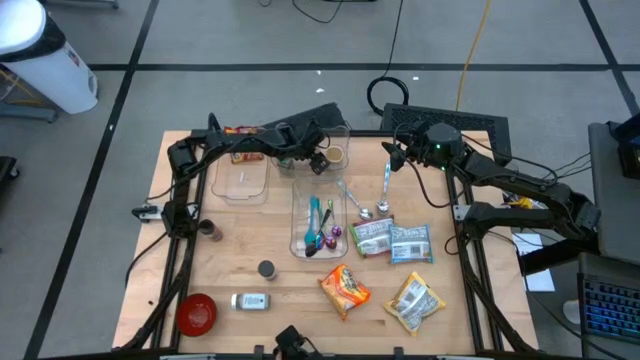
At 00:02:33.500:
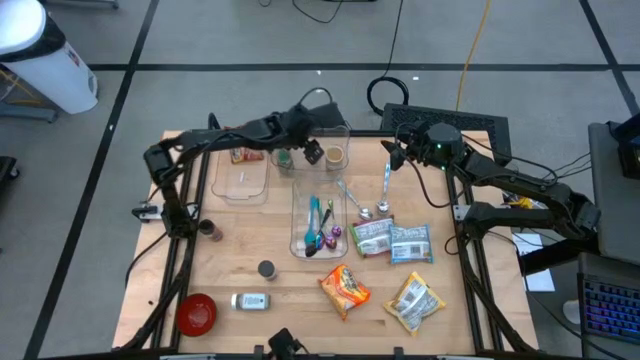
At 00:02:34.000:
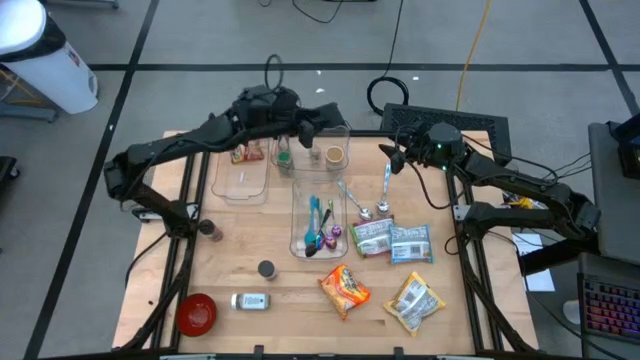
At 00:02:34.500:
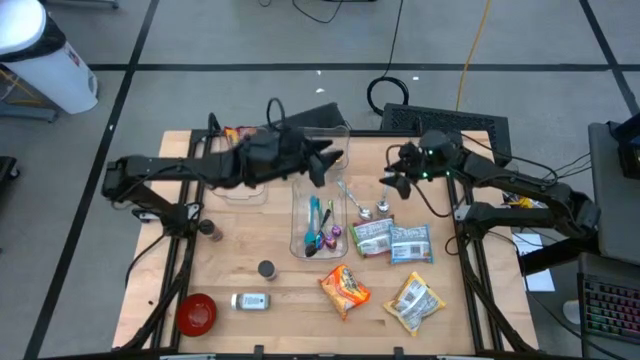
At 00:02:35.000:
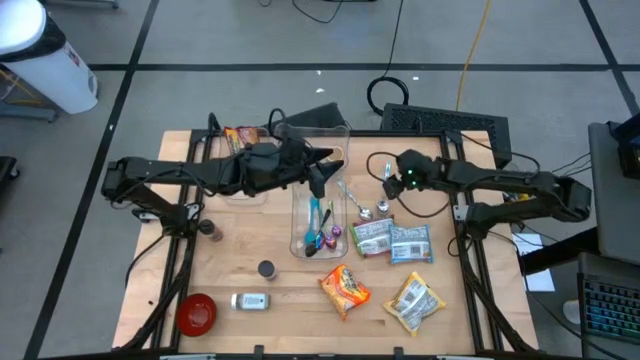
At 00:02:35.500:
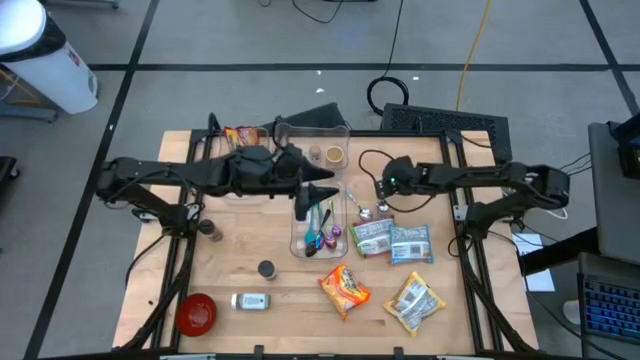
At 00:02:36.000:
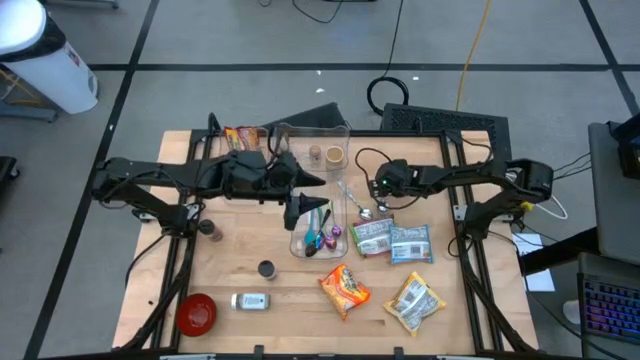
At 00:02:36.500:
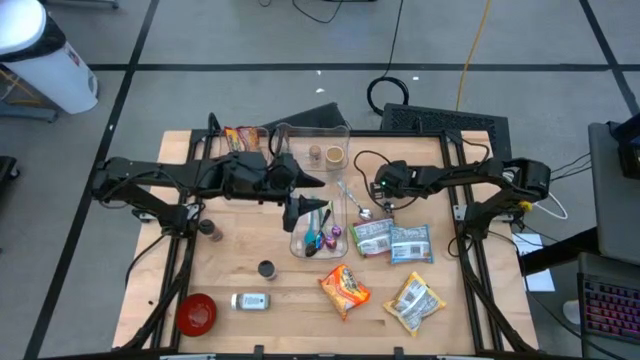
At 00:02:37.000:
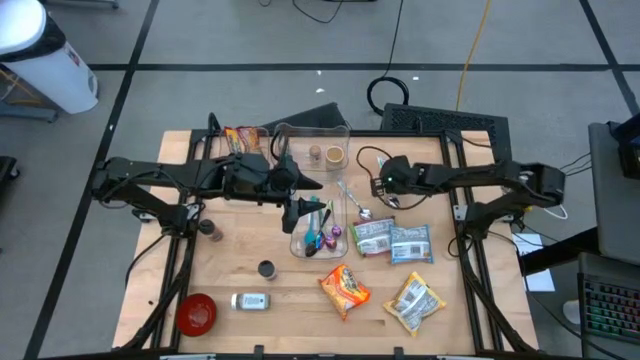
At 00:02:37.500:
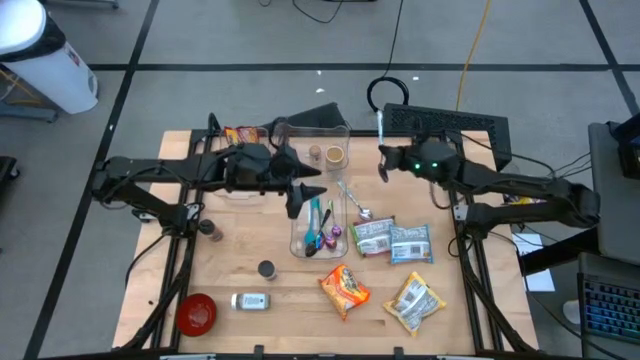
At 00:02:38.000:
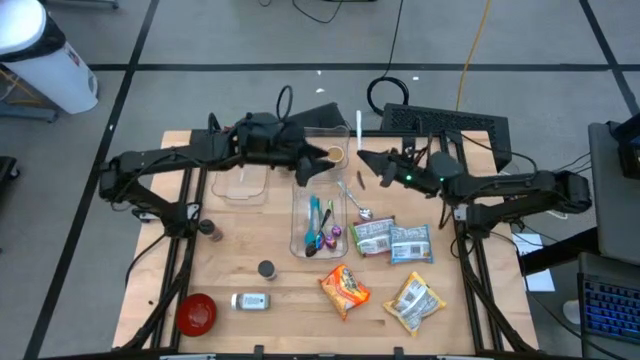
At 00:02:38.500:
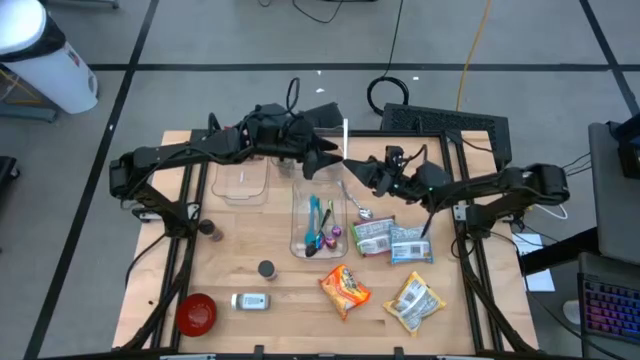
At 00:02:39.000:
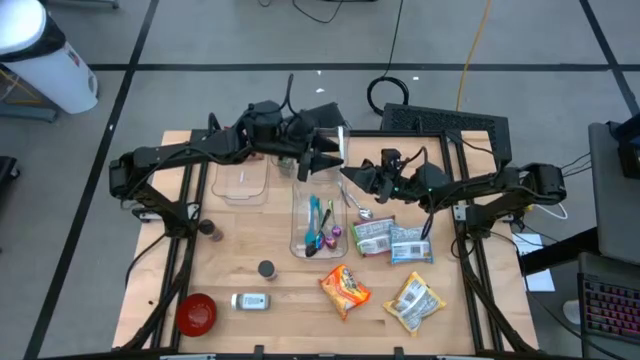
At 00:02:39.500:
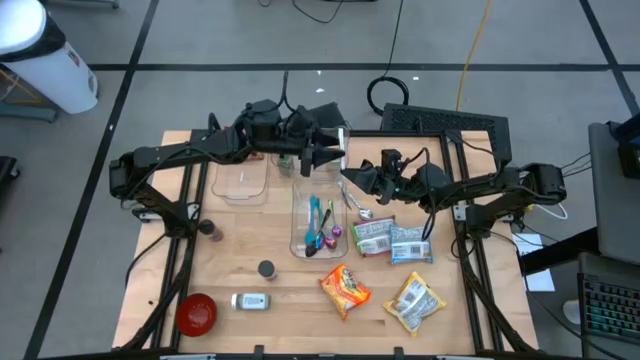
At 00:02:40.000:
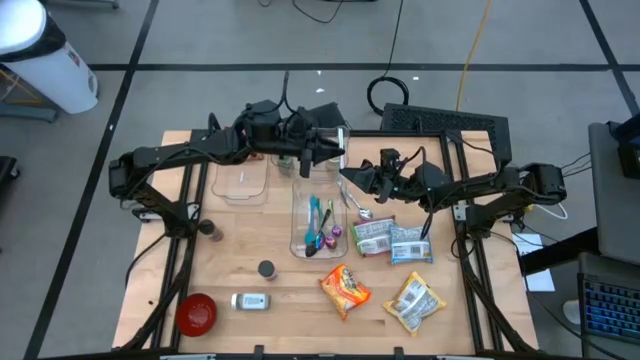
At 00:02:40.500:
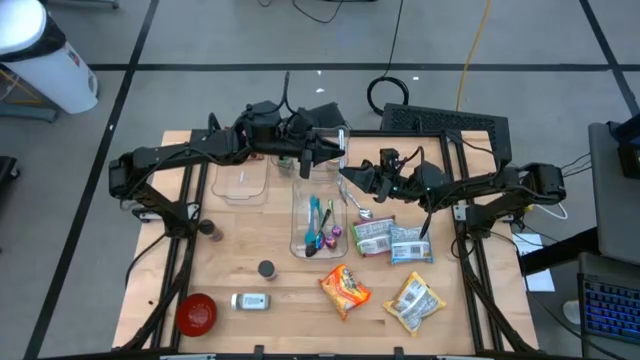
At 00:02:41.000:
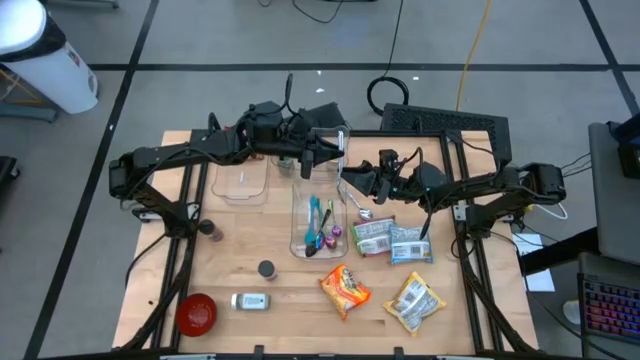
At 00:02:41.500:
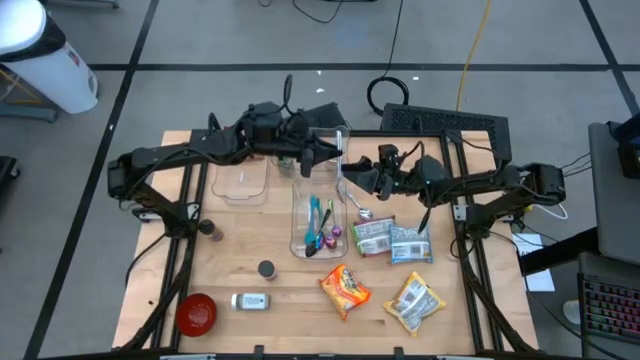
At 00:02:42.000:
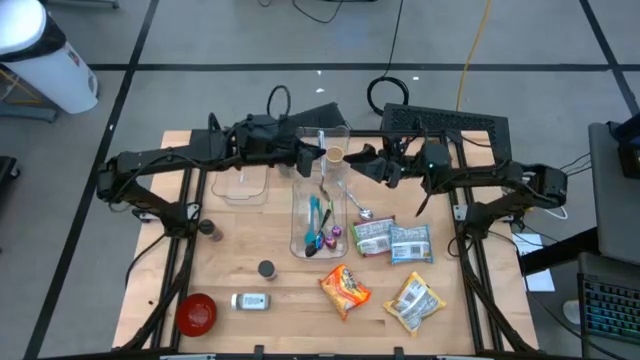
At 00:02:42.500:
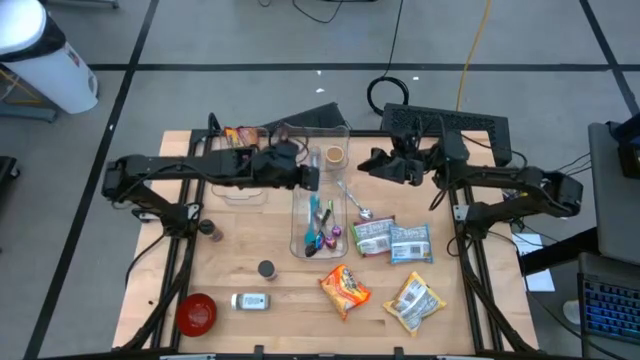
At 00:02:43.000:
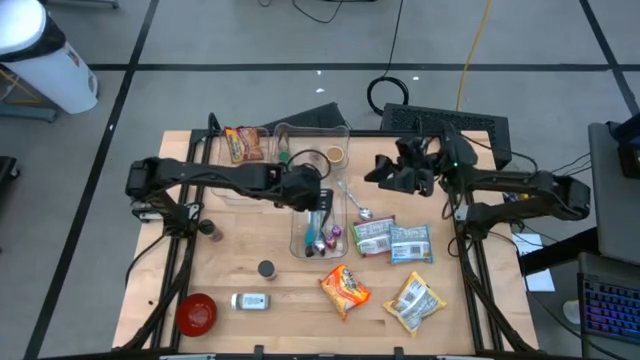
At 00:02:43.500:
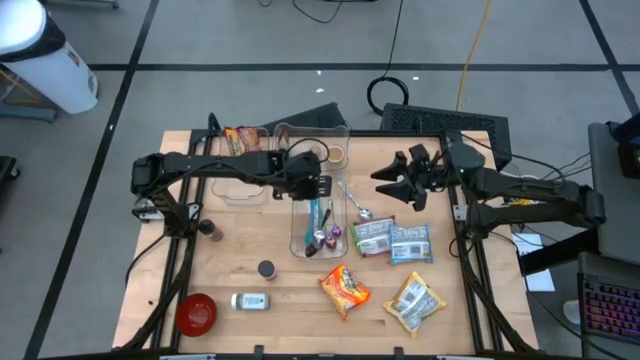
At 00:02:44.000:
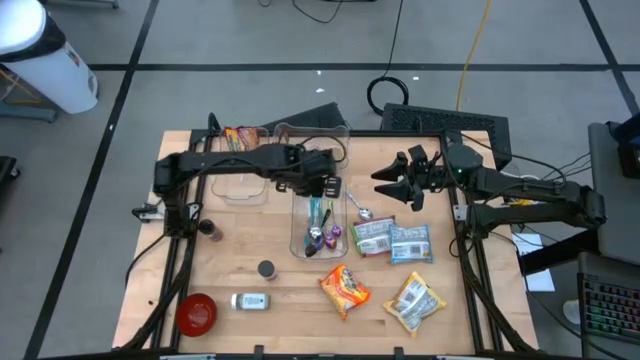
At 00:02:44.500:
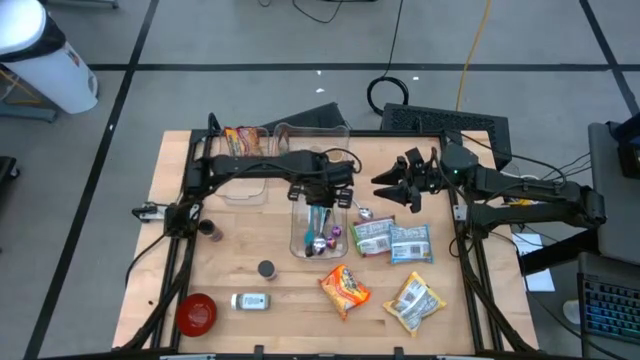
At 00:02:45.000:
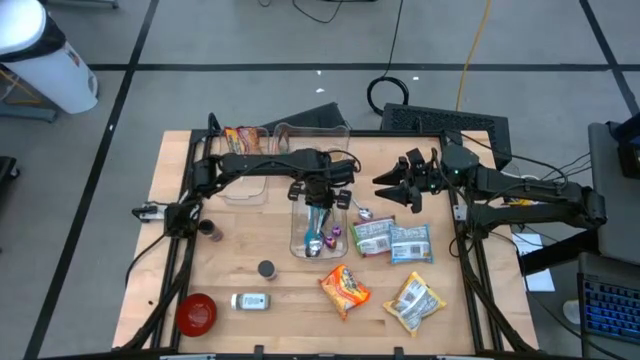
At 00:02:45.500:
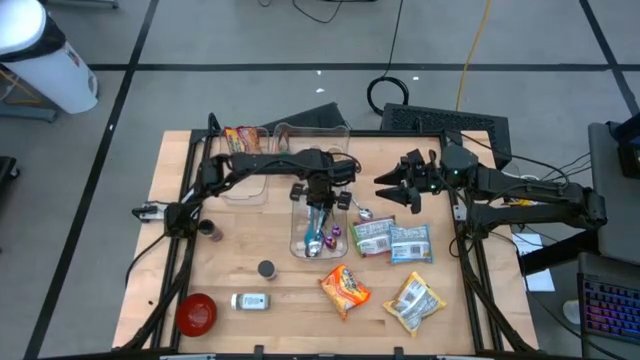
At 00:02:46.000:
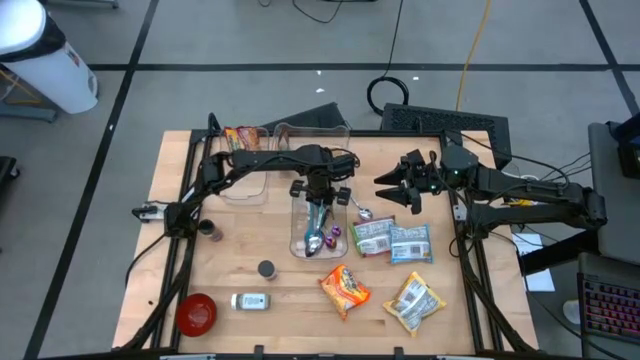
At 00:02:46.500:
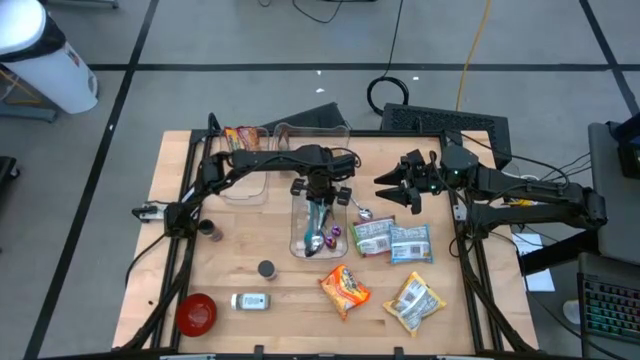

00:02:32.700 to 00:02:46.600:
Task: Pick & Place Food Item
Put the right white blue spoon into the bottom right transparent bin
